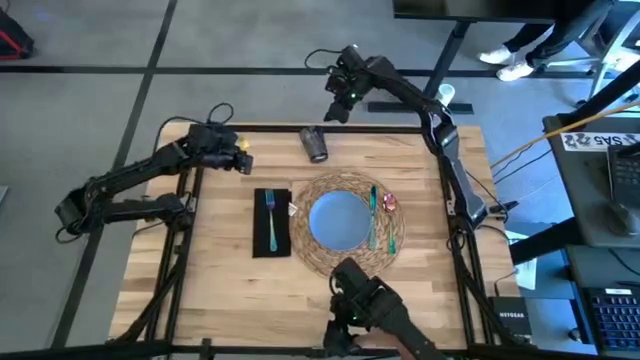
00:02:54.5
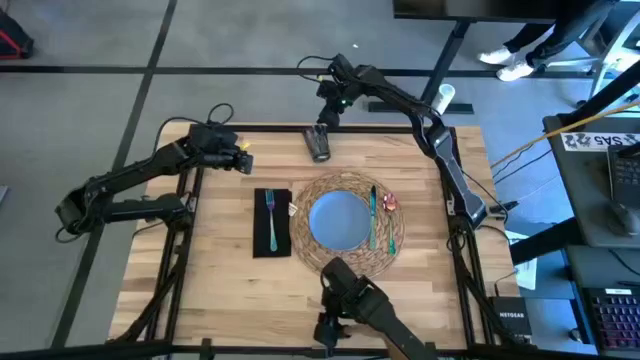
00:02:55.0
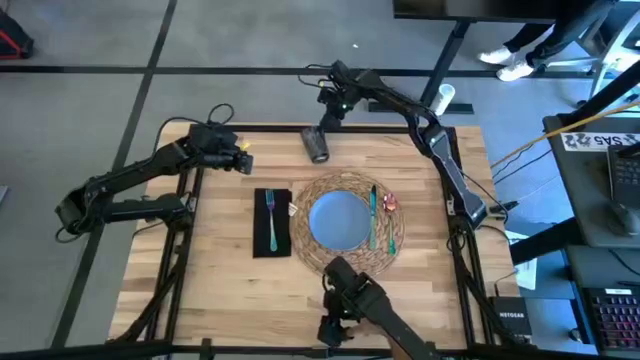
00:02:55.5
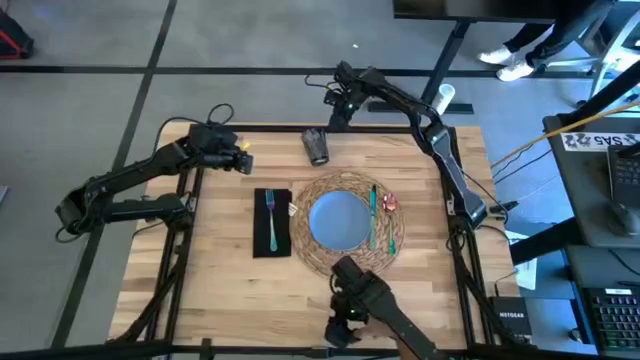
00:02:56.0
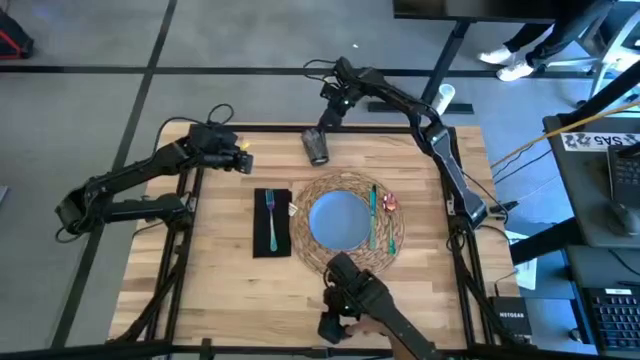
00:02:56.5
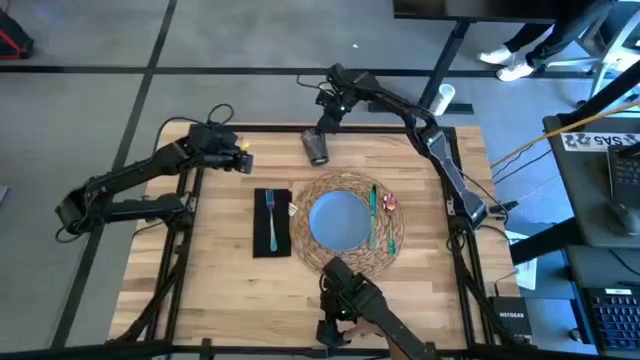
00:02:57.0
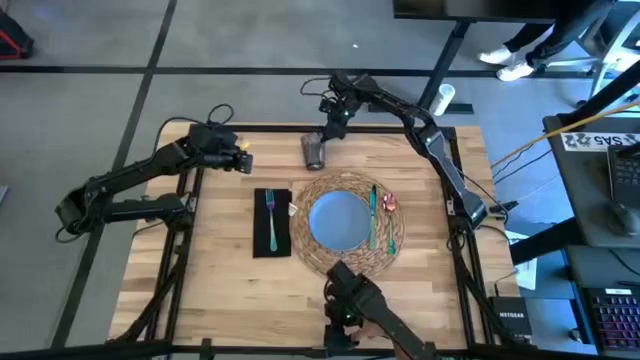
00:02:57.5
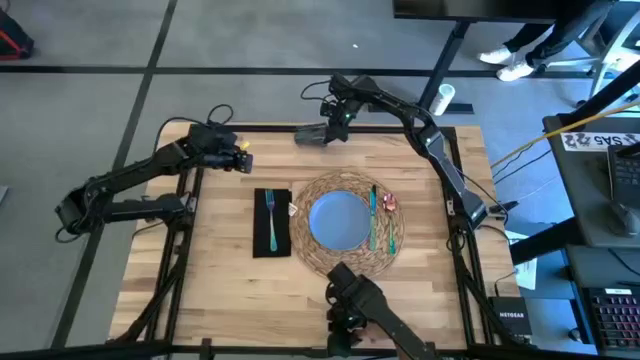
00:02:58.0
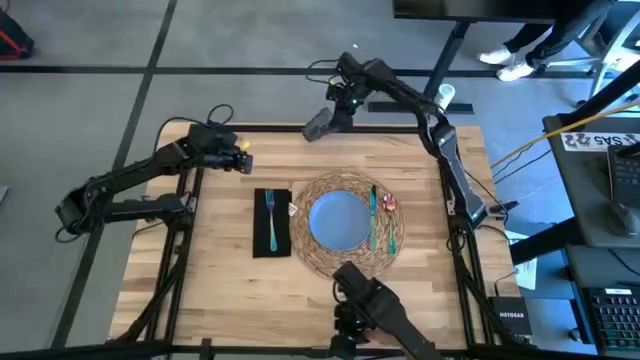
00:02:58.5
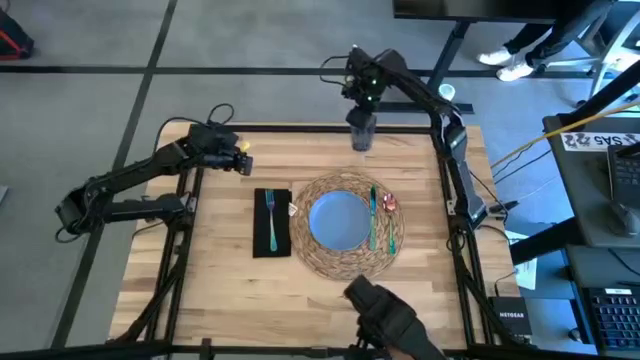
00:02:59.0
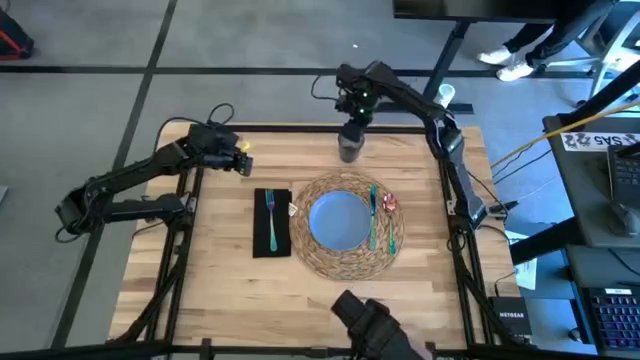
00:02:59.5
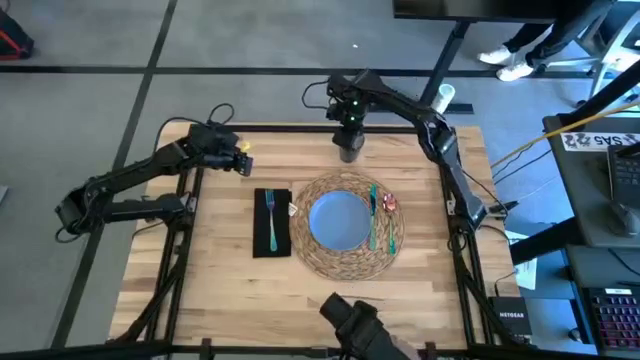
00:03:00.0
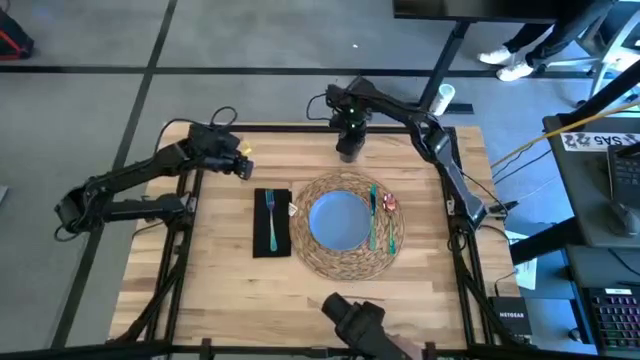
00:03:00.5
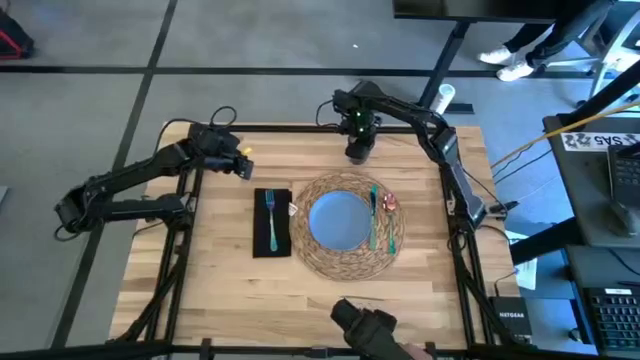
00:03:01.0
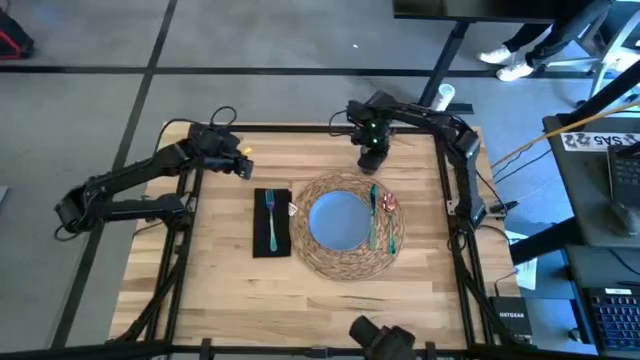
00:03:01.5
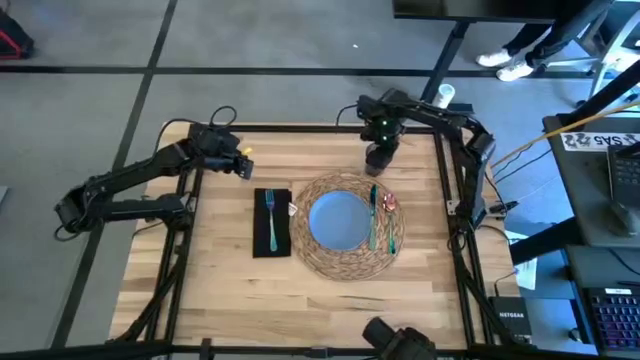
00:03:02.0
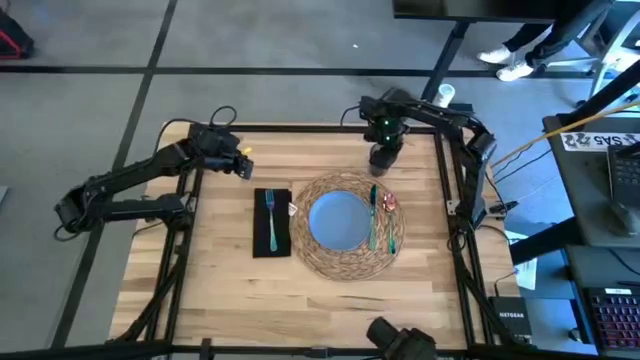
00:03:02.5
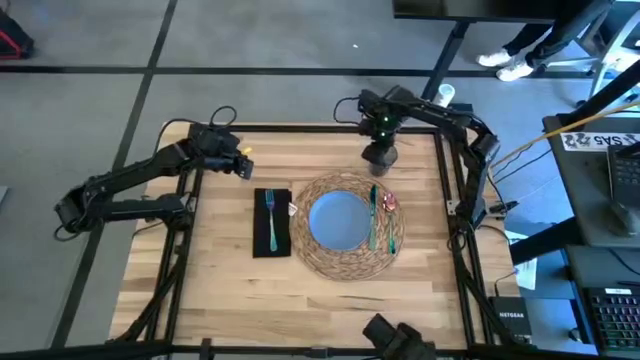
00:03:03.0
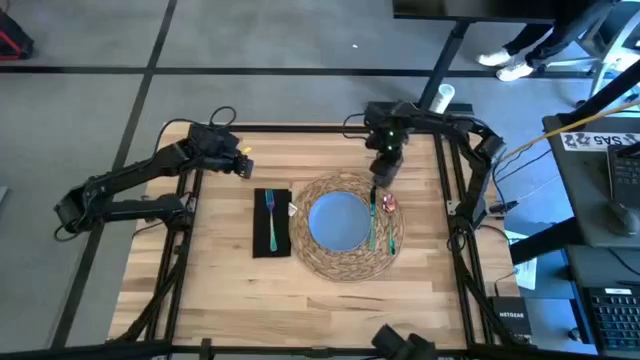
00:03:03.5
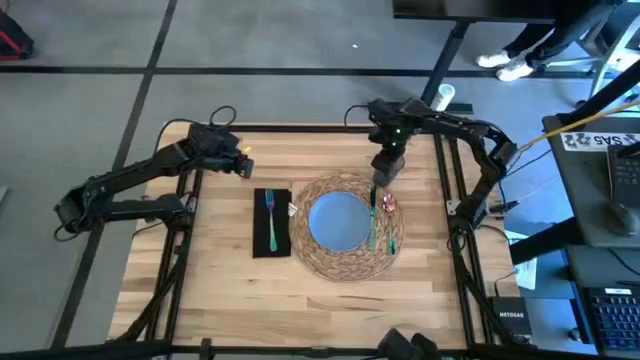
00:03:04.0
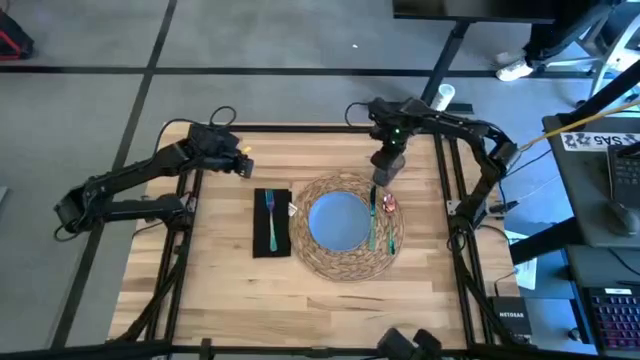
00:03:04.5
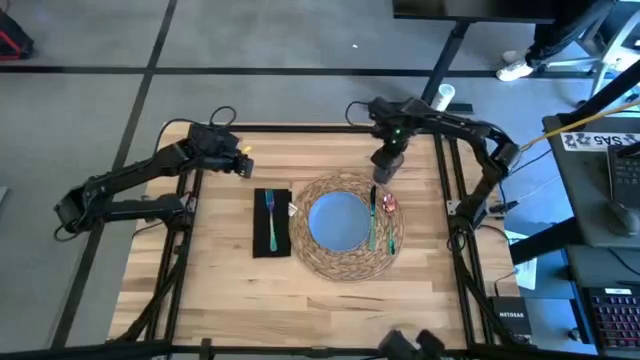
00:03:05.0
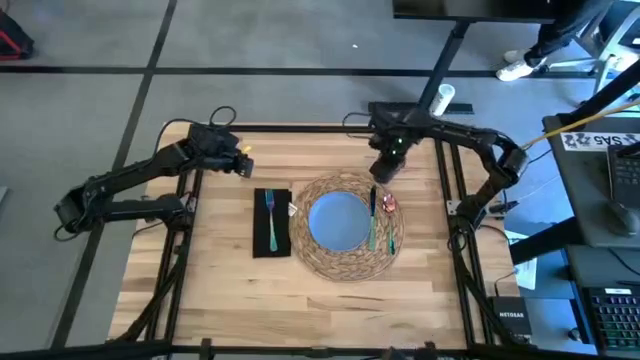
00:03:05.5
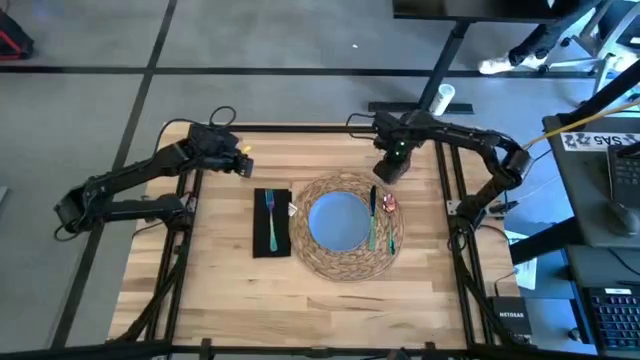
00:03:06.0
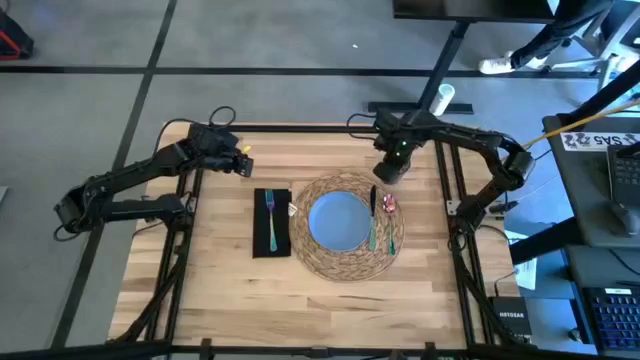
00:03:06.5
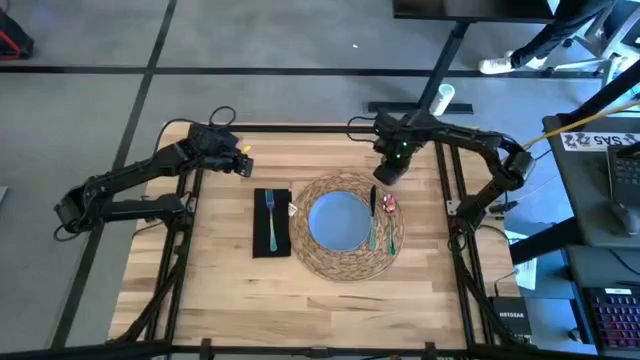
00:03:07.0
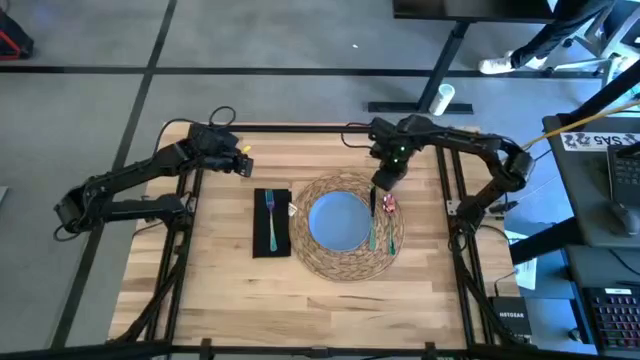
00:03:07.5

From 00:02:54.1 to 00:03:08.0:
Task: Set table place
Put the blue glass cup on top of the brown placemat

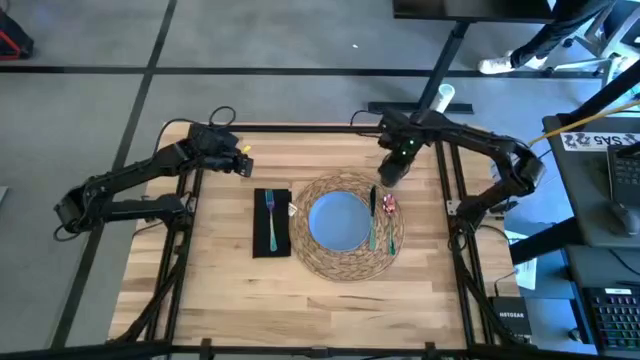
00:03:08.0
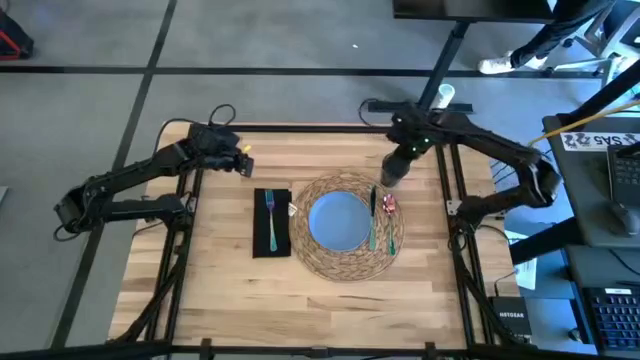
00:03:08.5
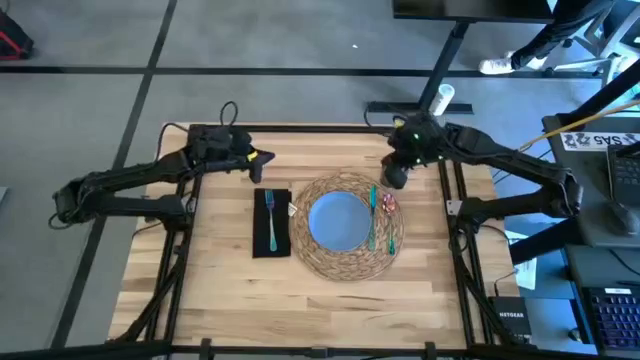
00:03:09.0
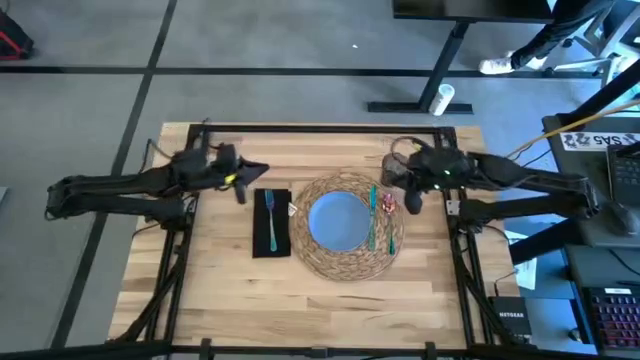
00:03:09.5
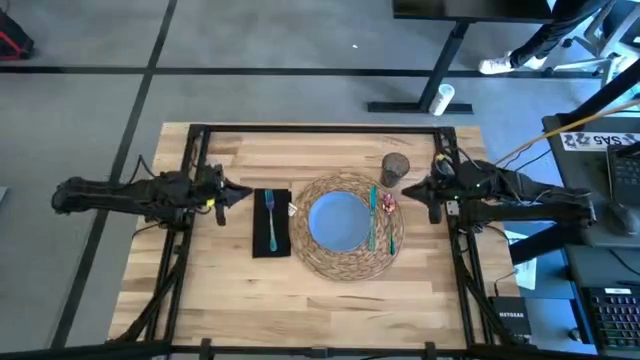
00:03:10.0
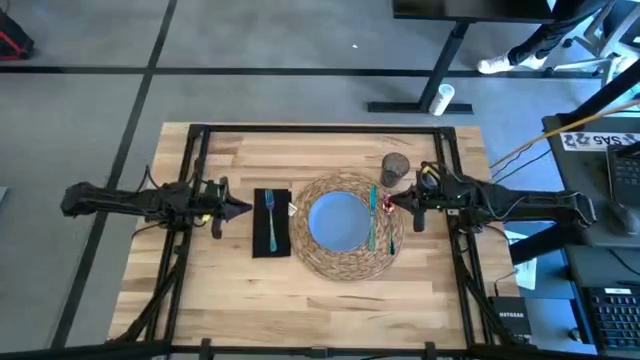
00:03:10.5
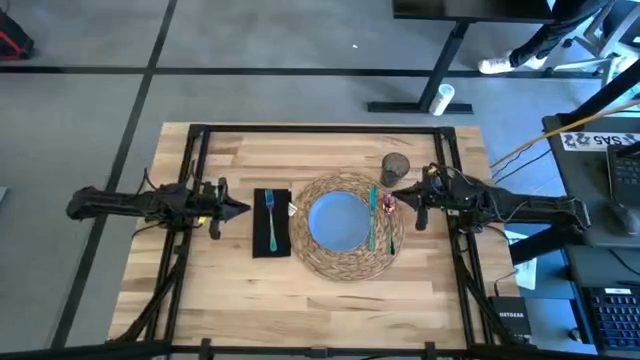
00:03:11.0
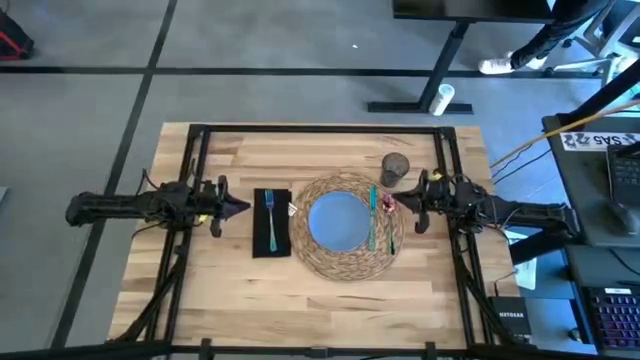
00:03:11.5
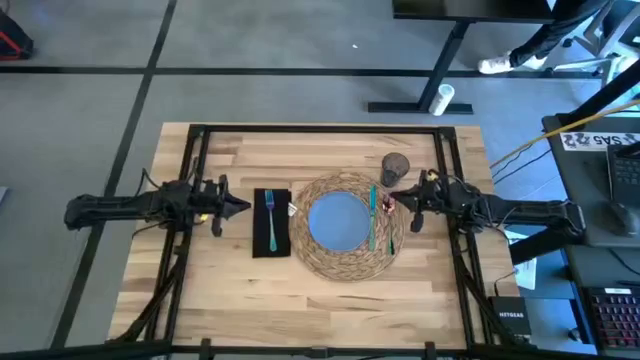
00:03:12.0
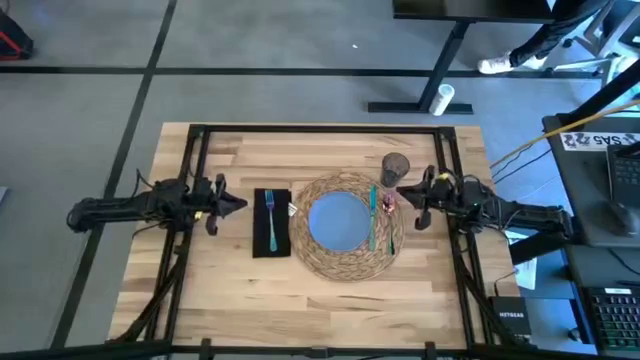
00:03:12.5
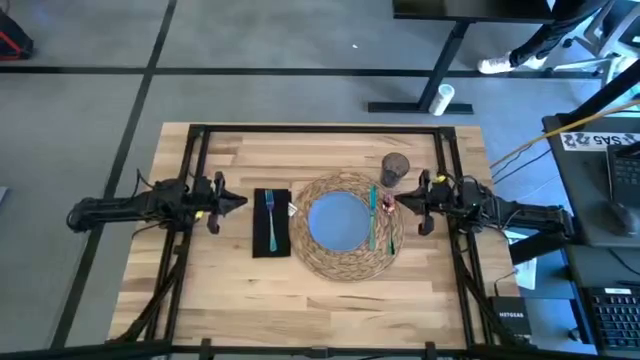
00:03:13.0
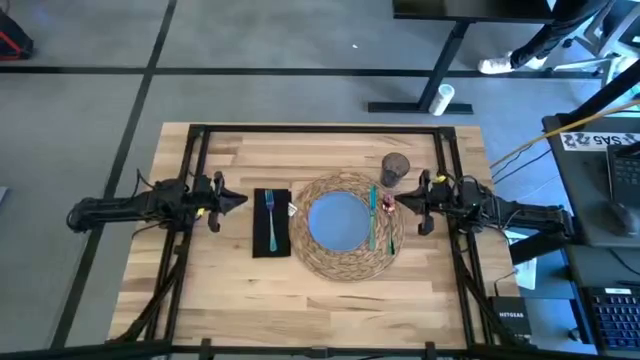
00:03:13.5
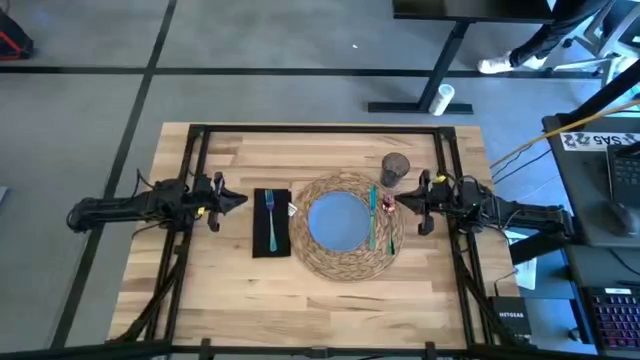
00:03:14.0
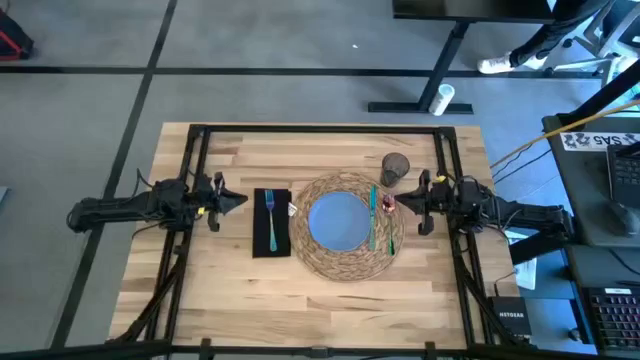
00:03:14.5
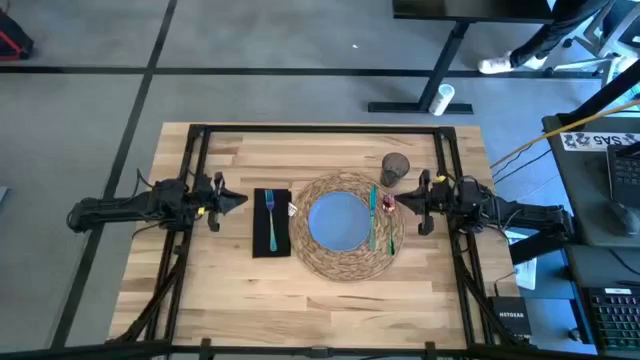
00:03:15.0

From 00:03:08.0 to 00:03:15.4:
Return to Home Position

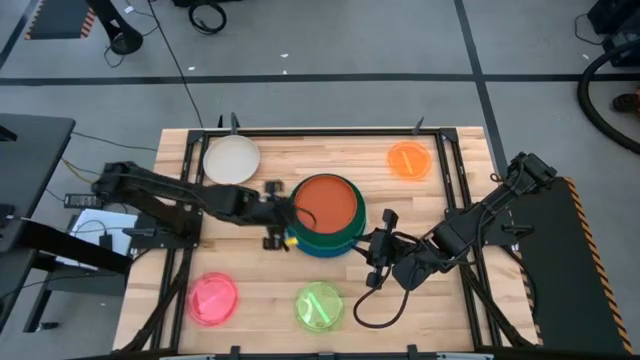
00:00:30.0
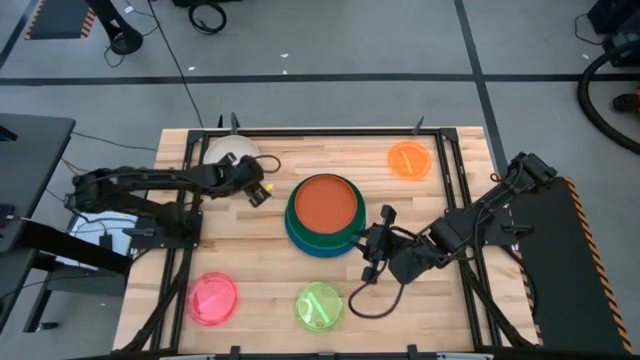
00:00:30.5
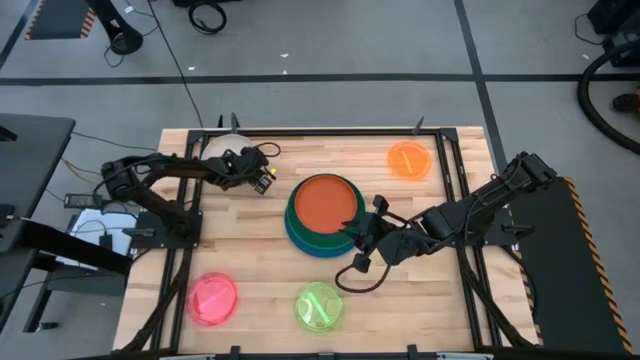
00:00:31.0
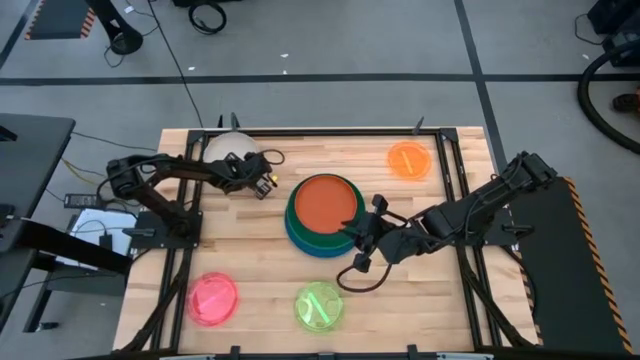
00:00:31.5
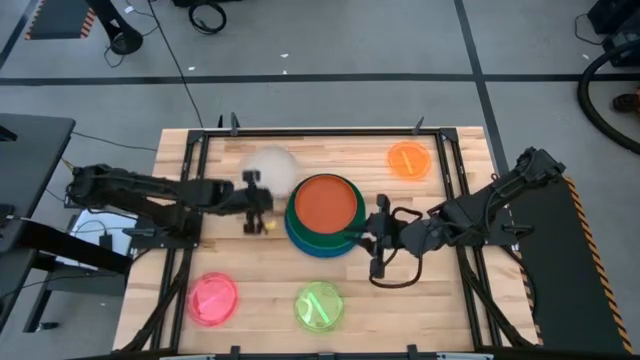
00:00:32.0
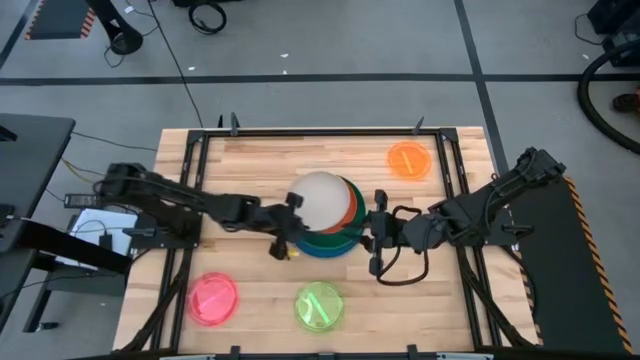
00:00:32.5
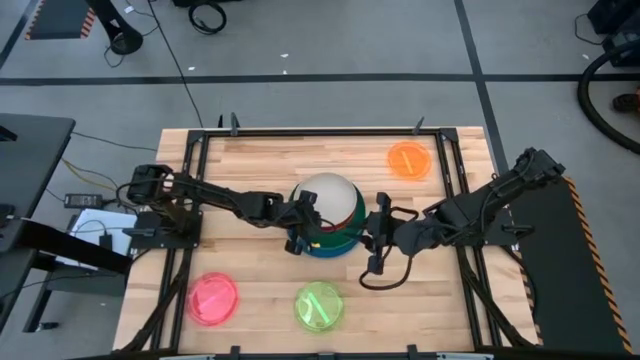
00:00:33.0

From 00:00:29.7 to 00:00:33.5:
Task: Stack plastic plates
Stack the gray plate on top of the orange plate
